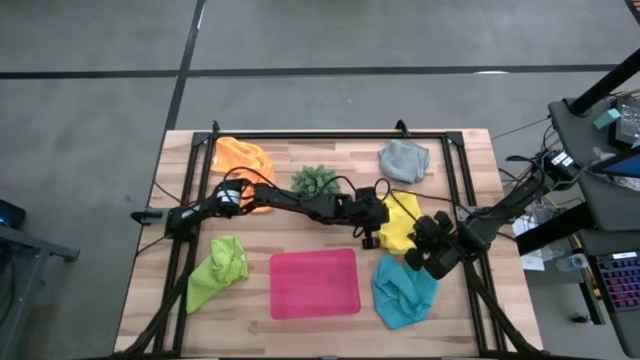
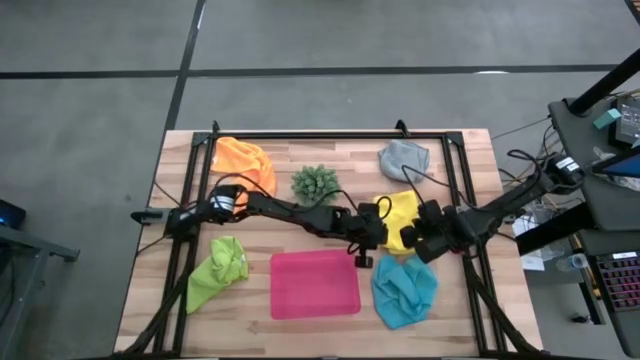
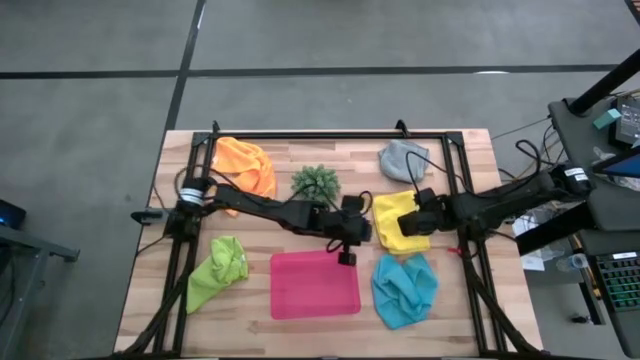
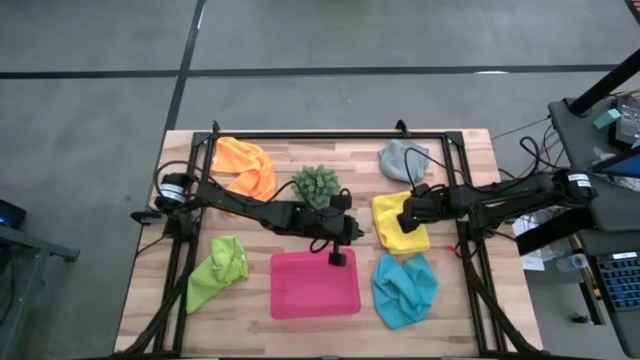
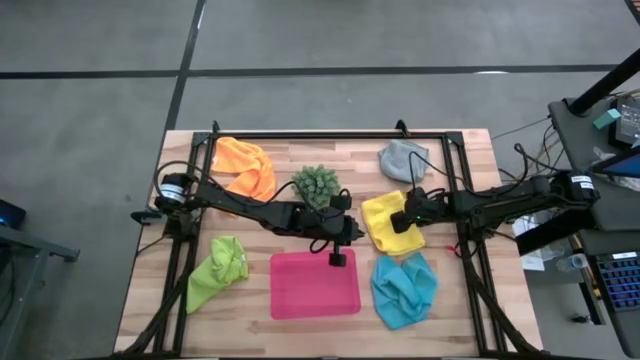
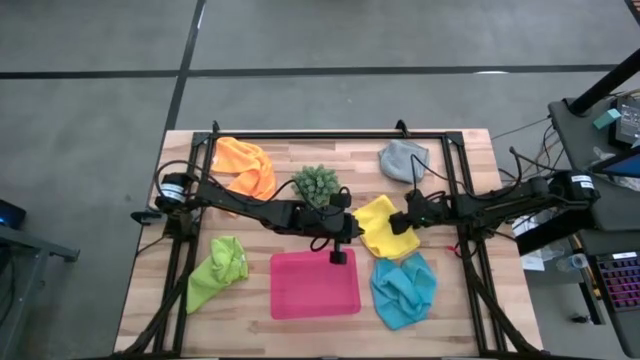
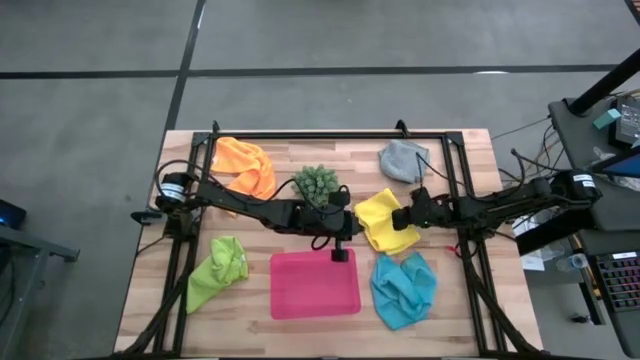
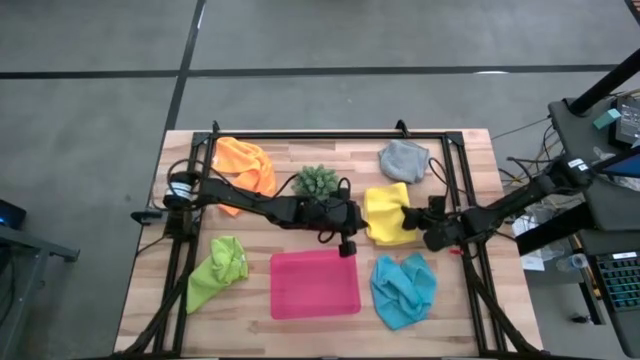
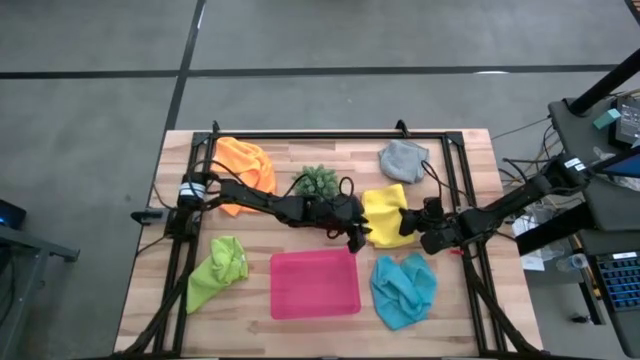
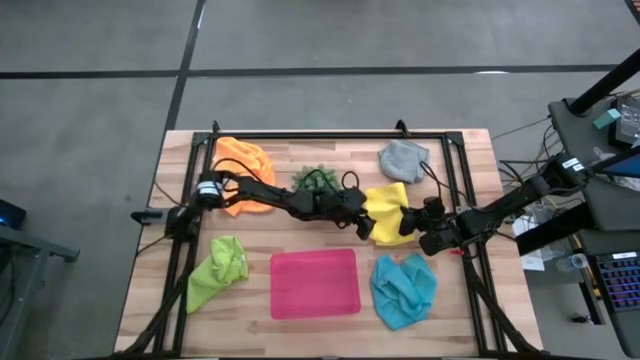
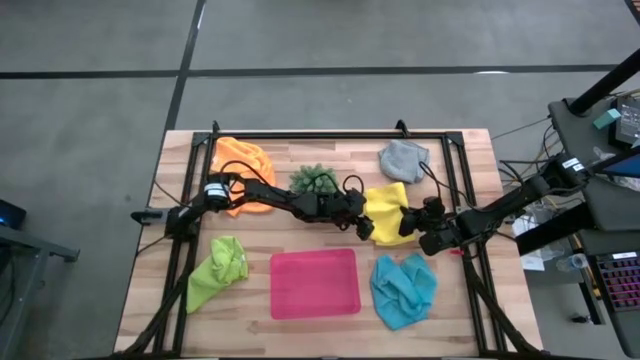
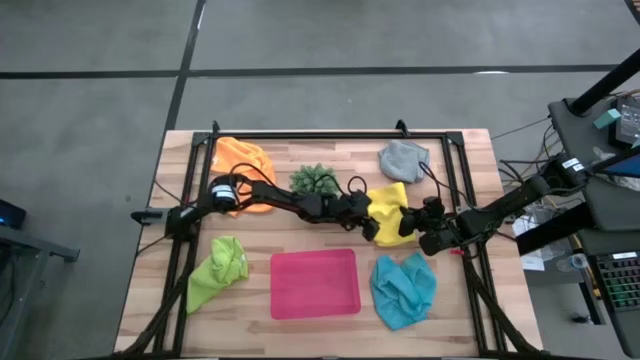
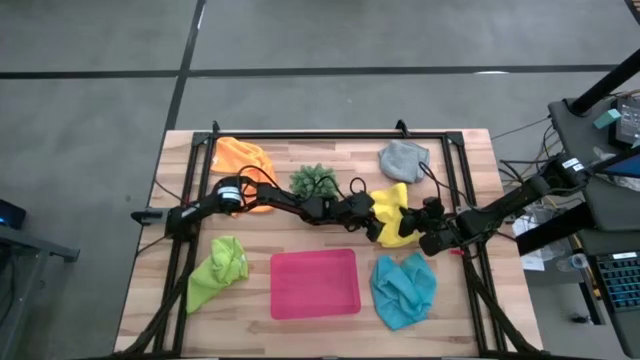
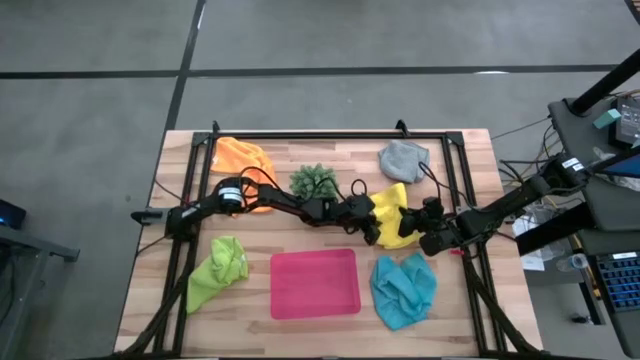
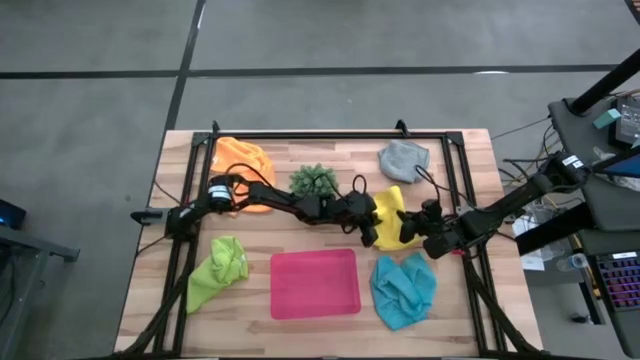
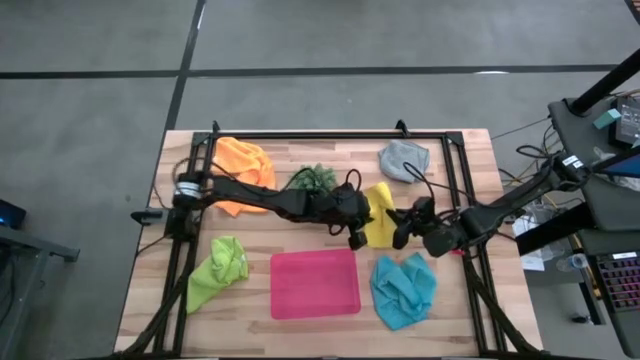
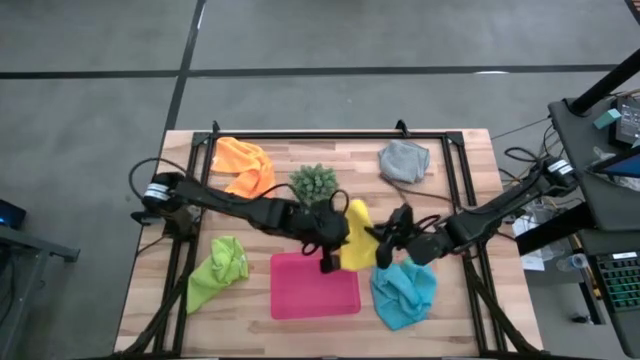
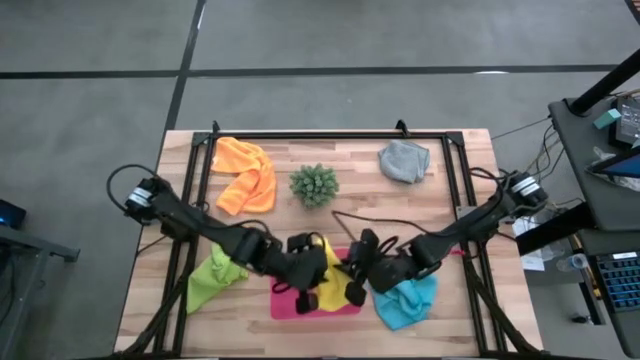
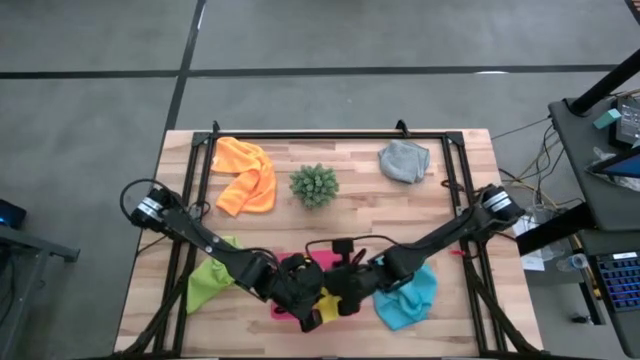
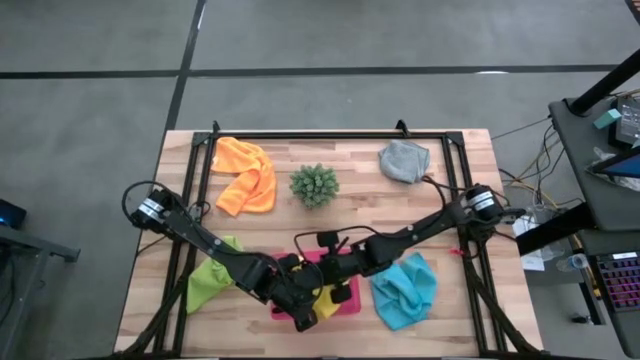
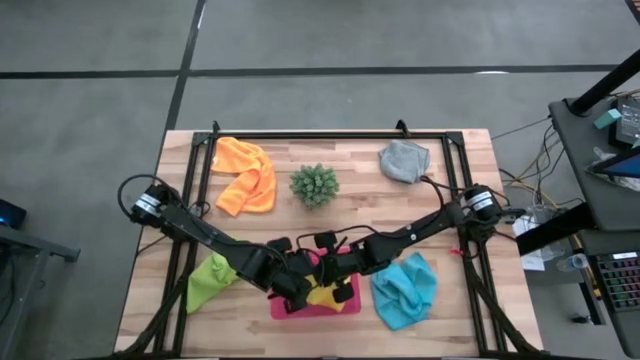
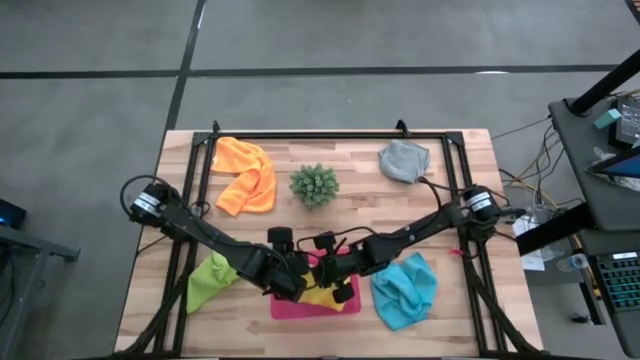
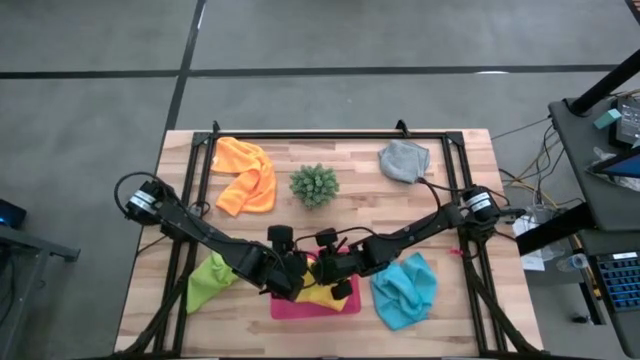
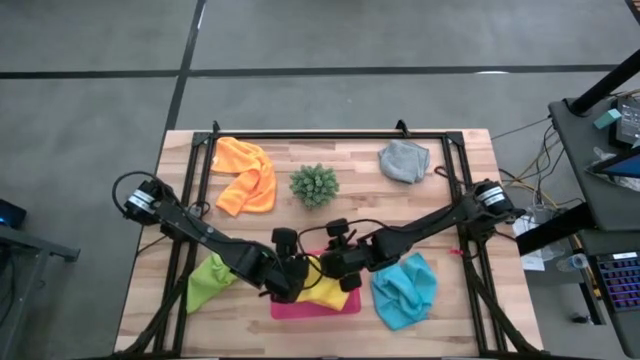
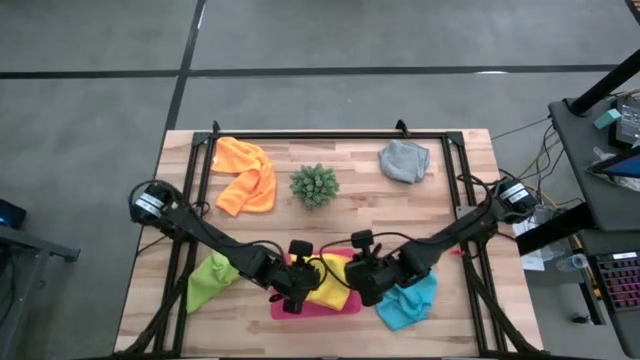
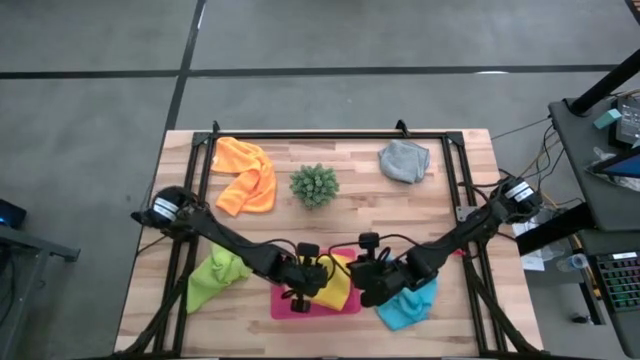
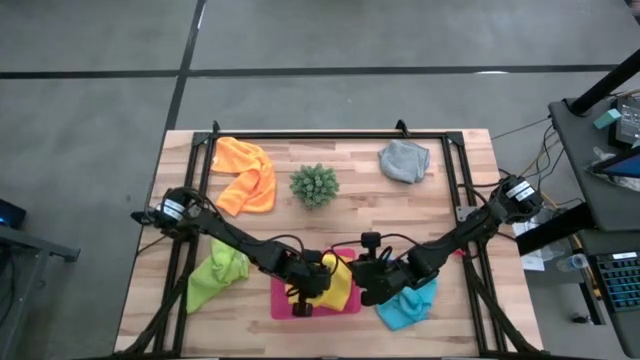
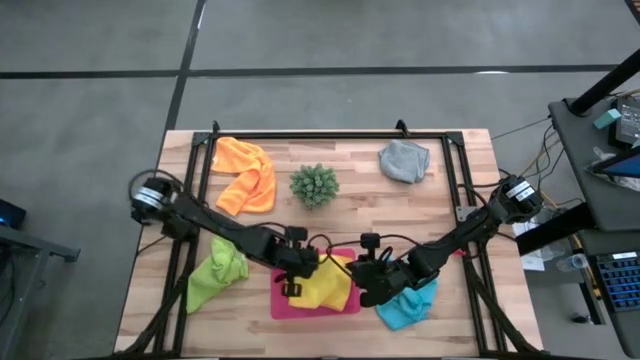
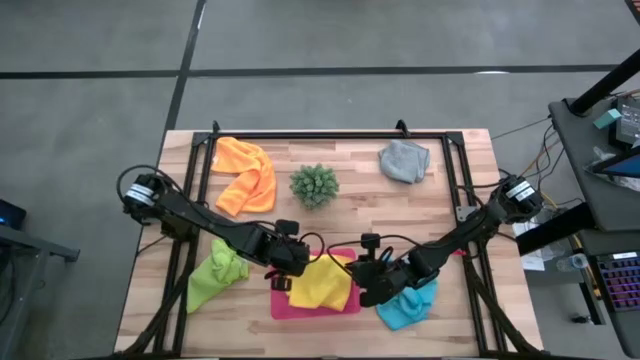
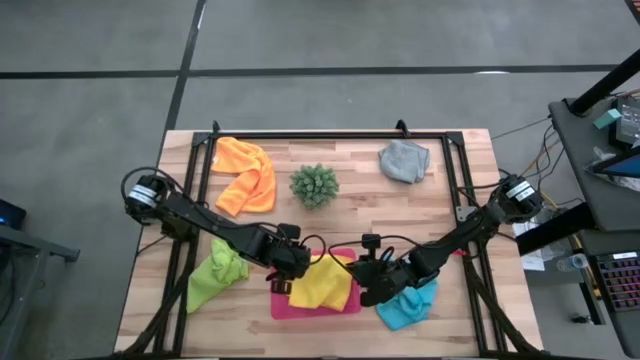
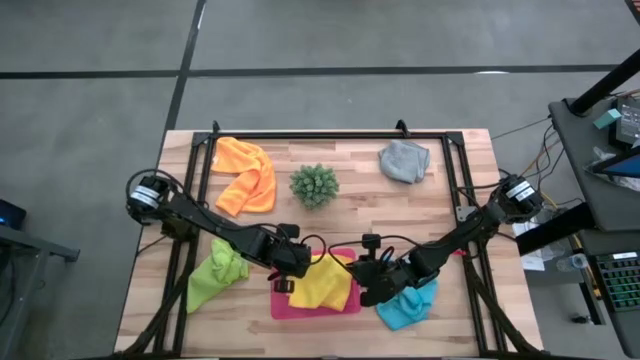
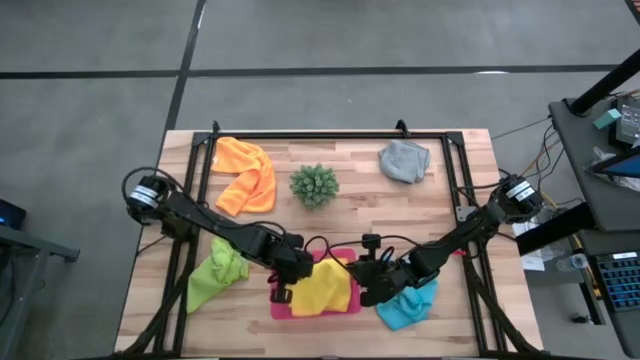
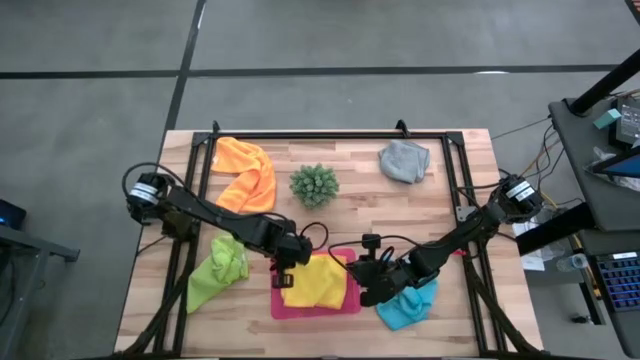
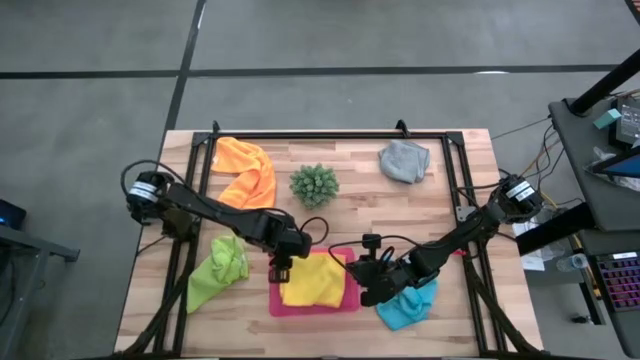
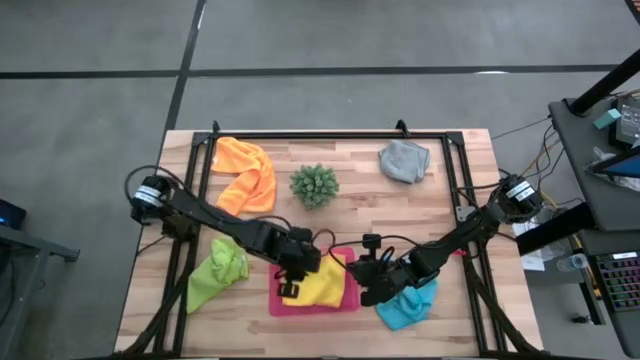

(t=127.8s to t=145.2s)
Task: Fold microfiber towels
Put the yellow microfiber cloth into the pink bin

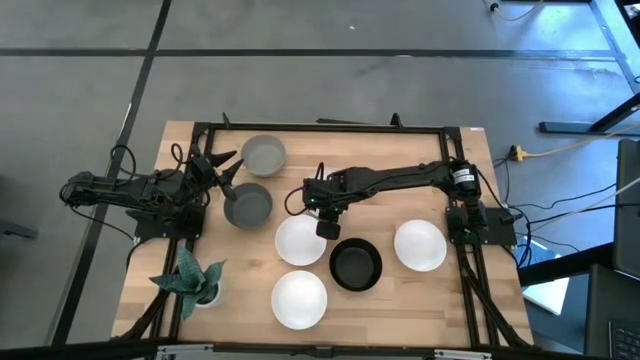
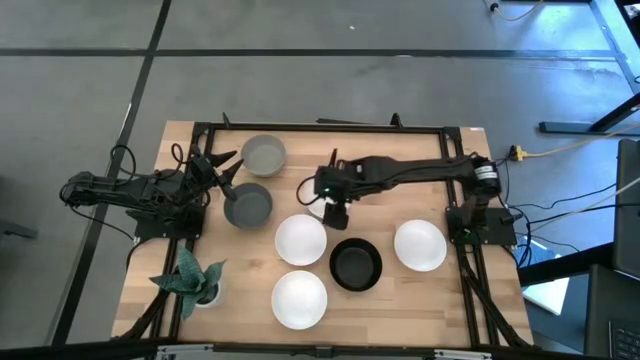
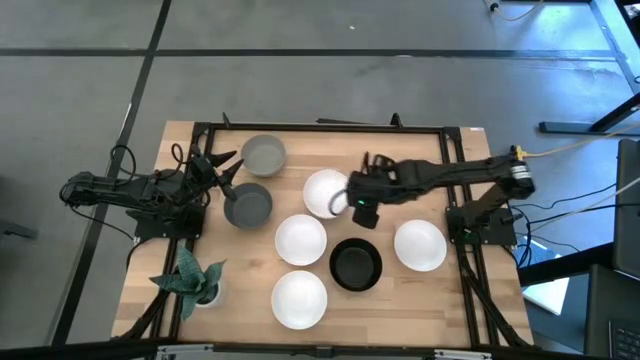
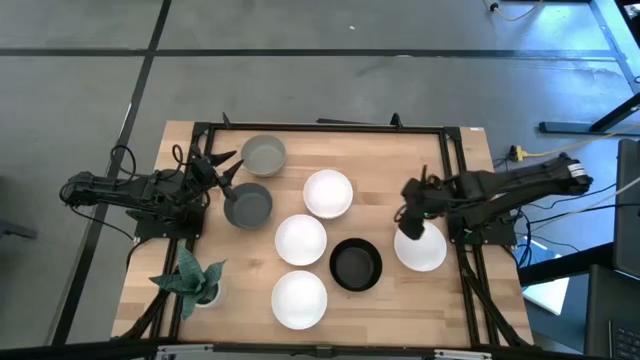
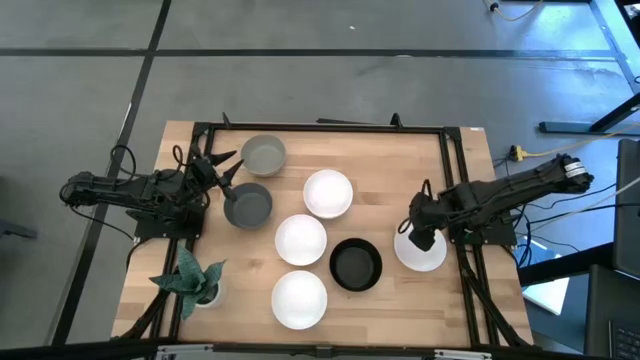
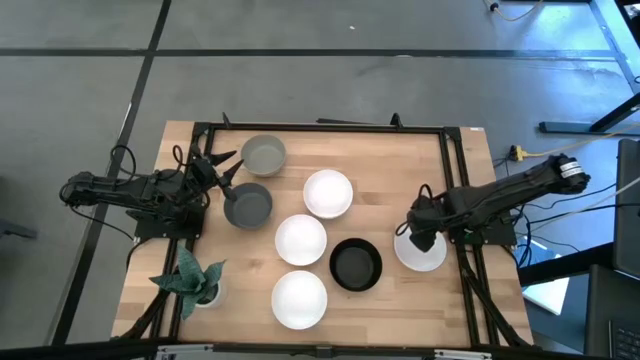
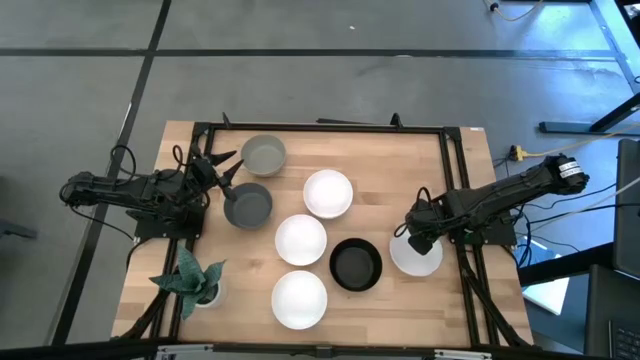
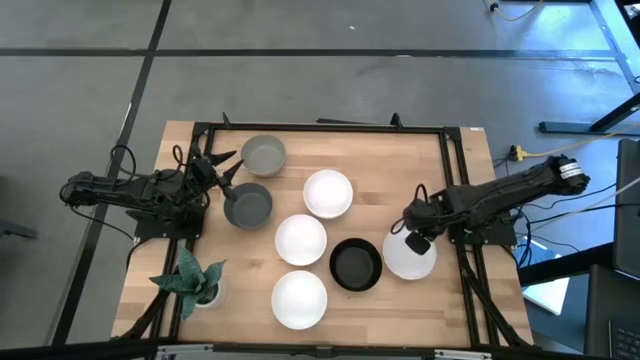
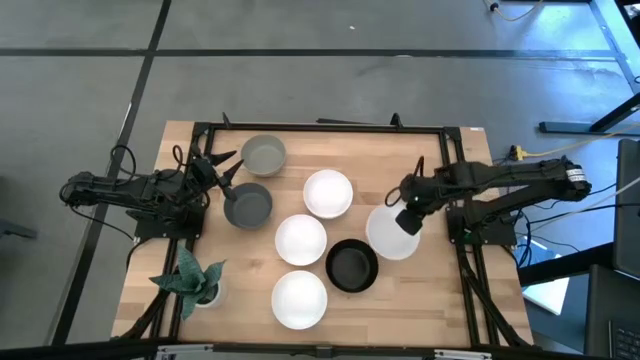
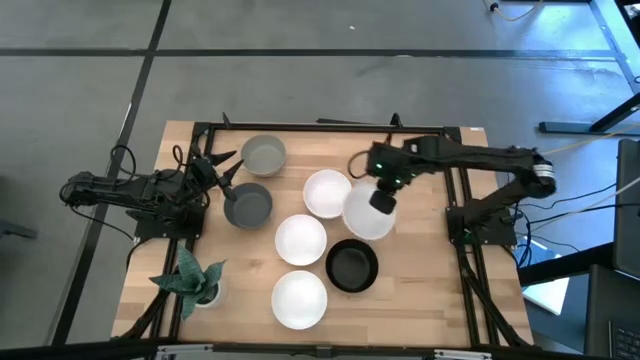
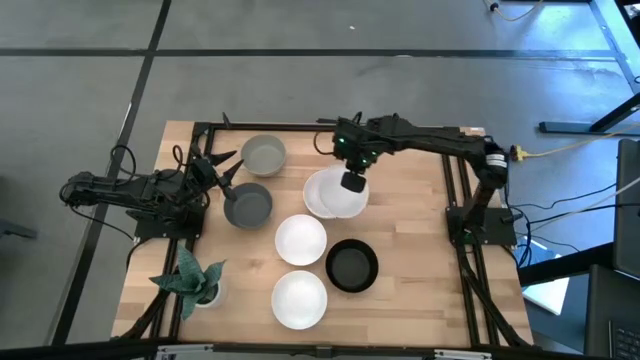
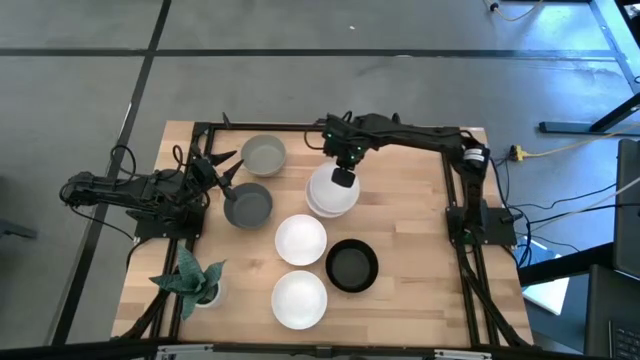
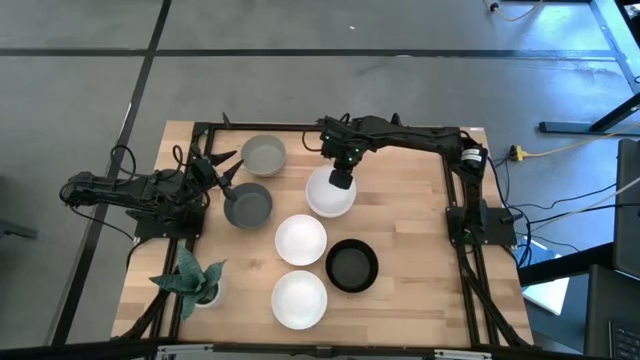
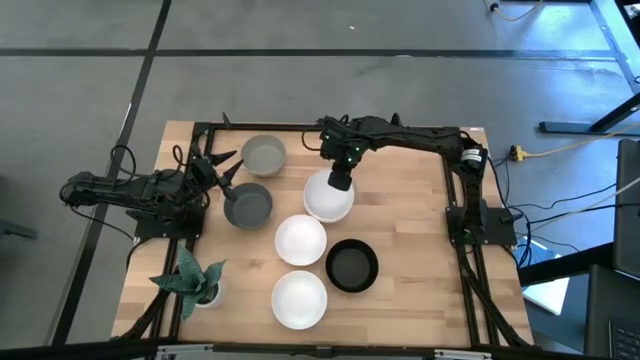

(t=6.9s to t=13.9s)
Task: Nest bowls inside each other
Stack the white bowl on top of the white bowl
